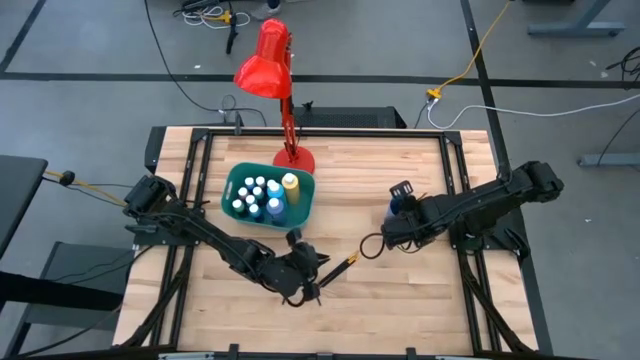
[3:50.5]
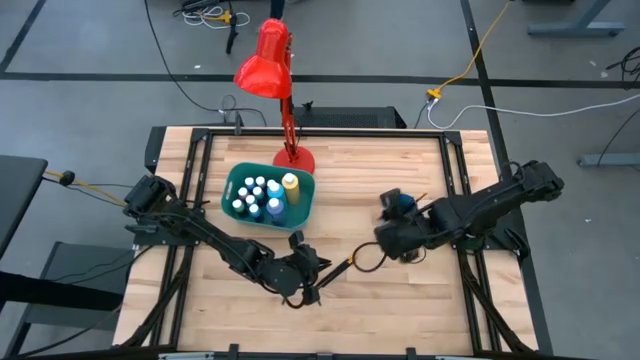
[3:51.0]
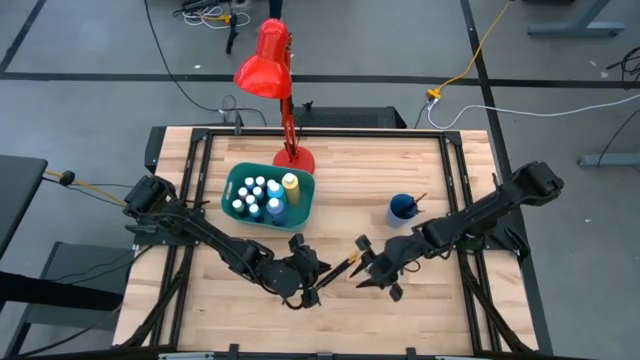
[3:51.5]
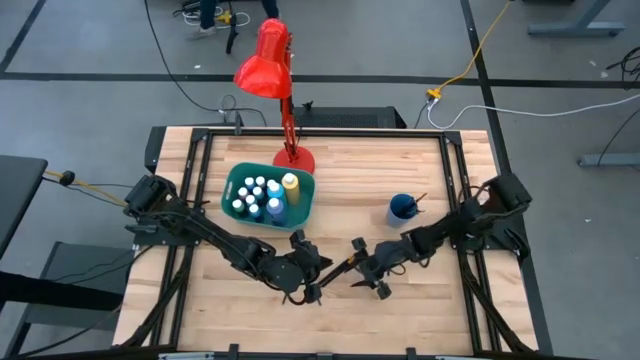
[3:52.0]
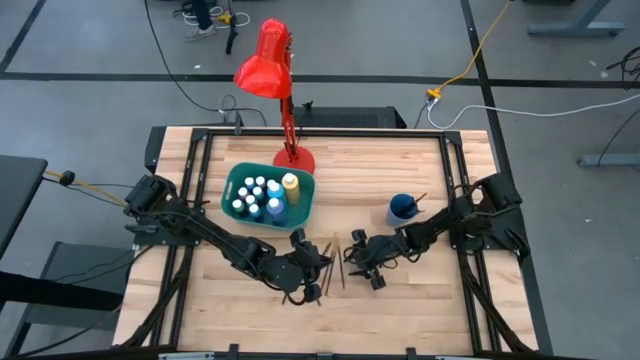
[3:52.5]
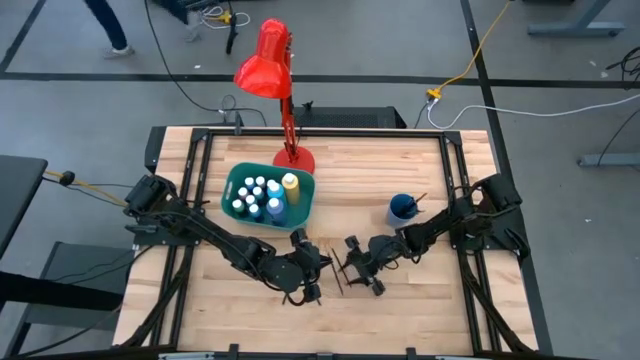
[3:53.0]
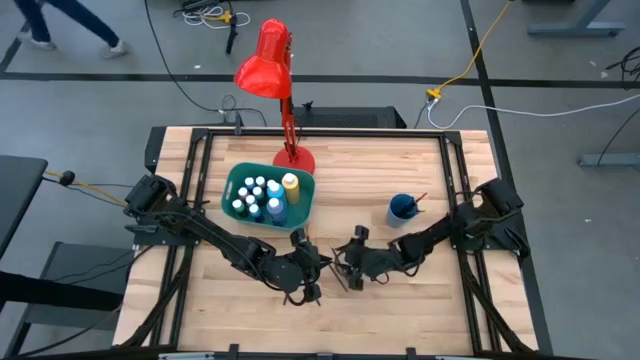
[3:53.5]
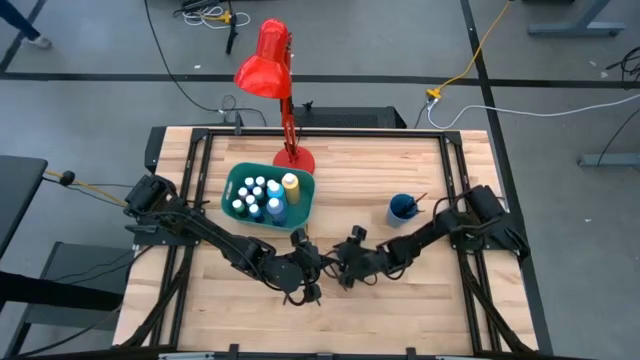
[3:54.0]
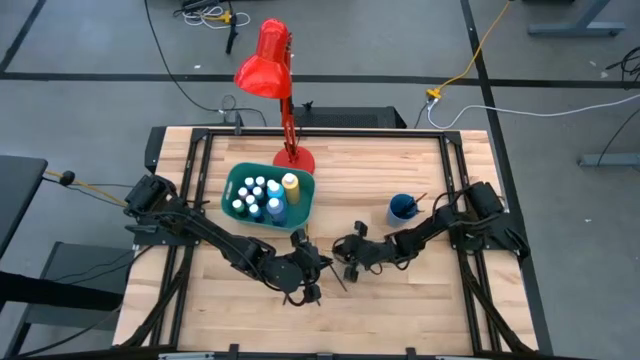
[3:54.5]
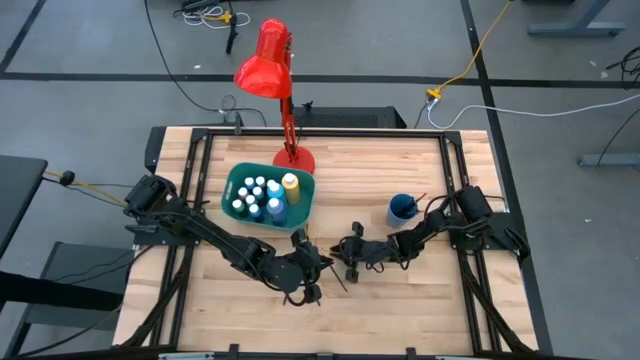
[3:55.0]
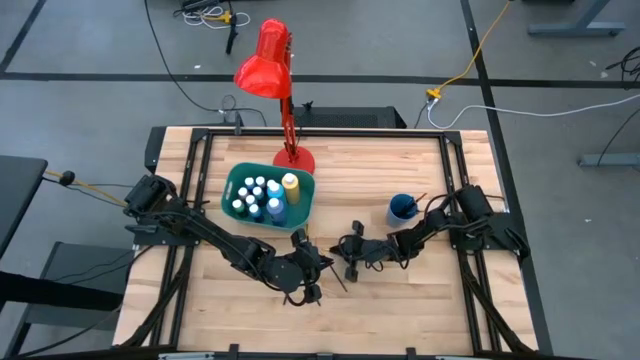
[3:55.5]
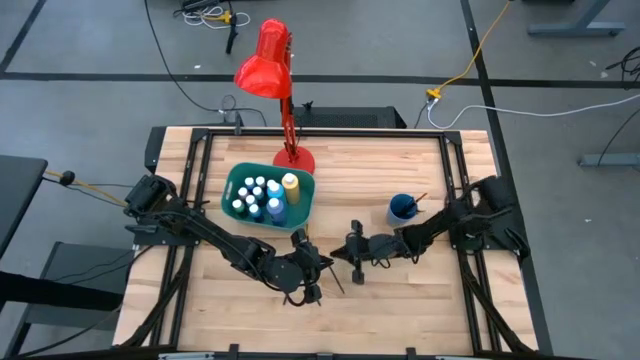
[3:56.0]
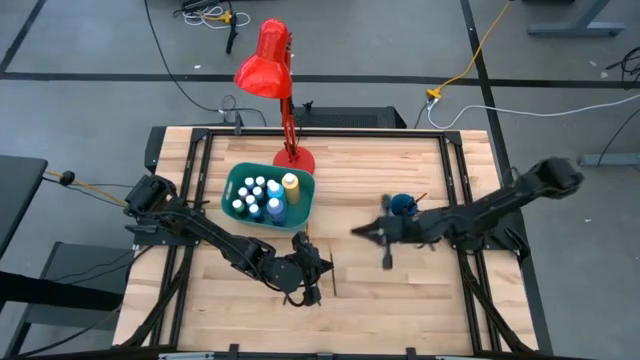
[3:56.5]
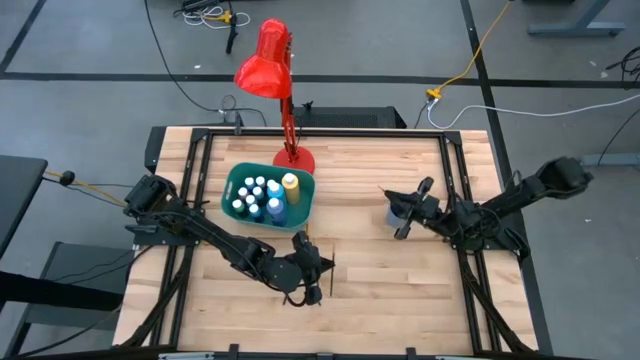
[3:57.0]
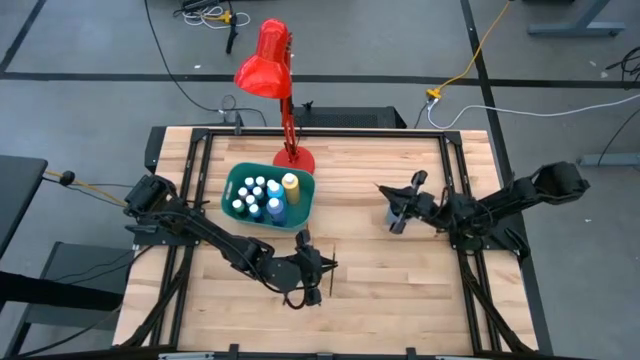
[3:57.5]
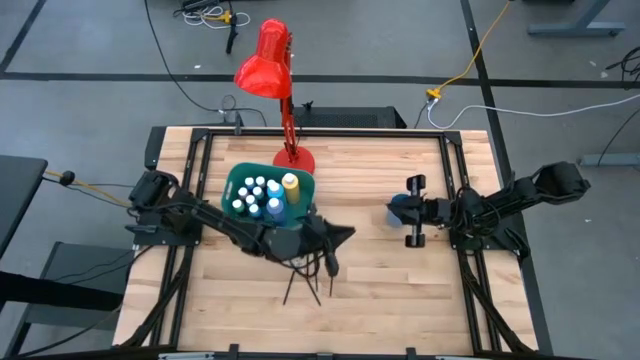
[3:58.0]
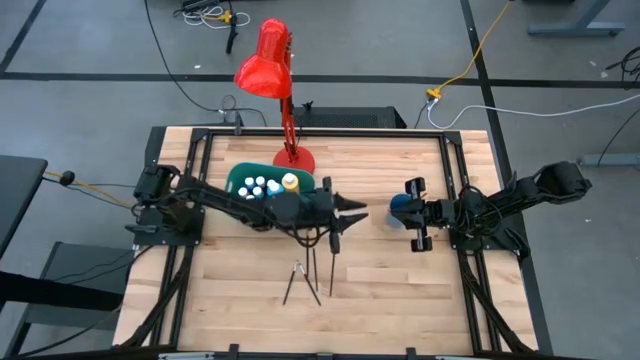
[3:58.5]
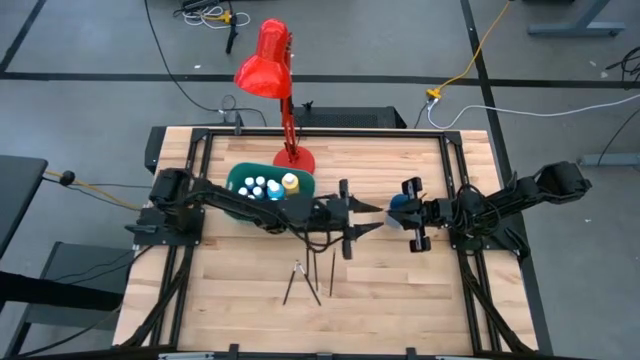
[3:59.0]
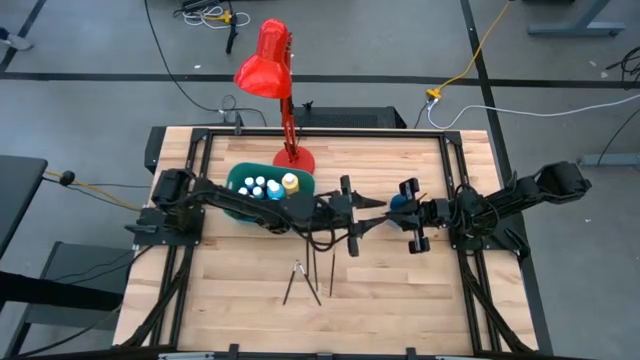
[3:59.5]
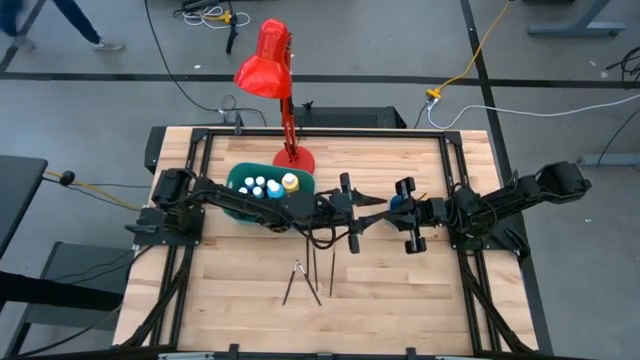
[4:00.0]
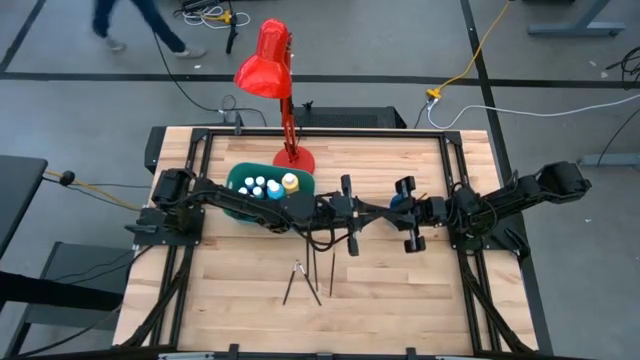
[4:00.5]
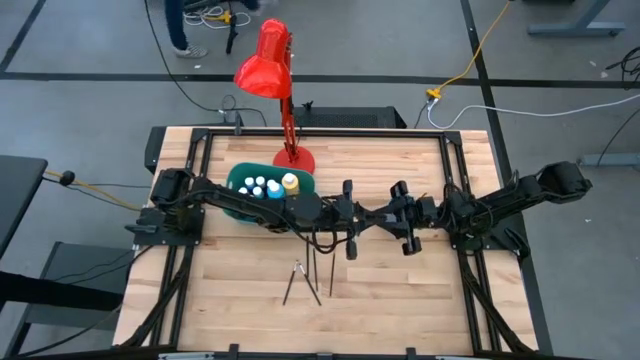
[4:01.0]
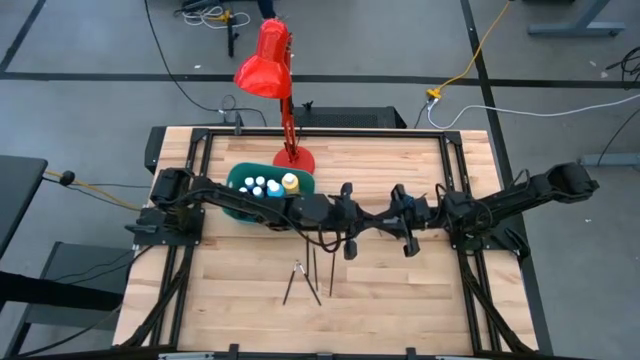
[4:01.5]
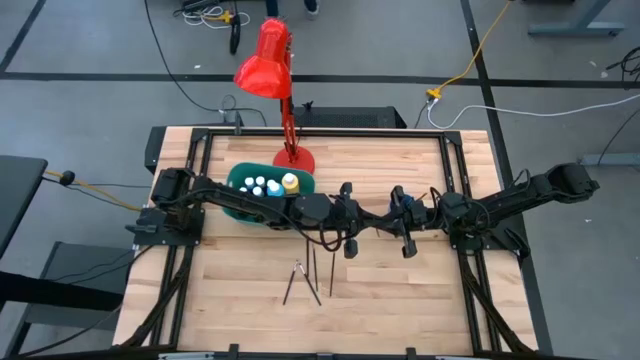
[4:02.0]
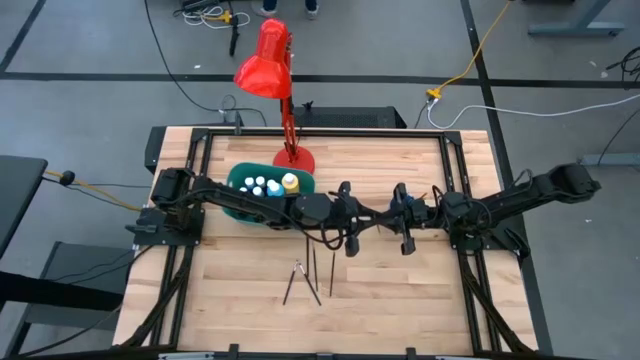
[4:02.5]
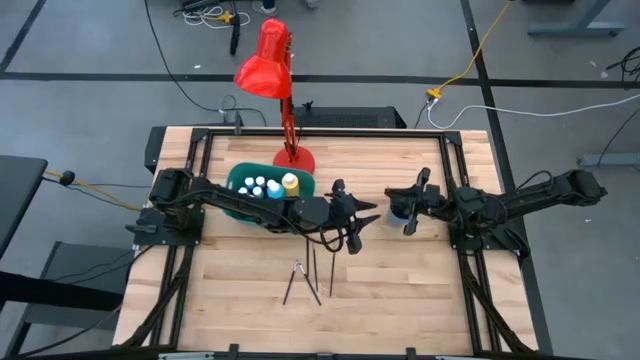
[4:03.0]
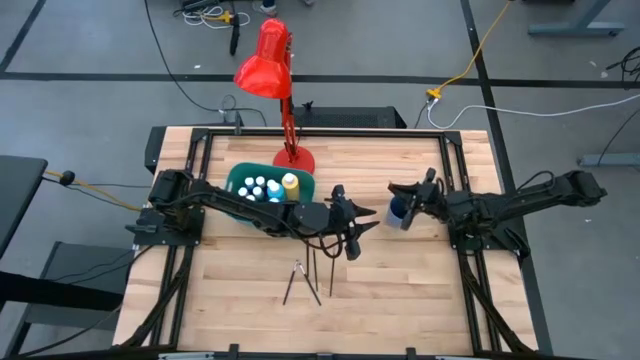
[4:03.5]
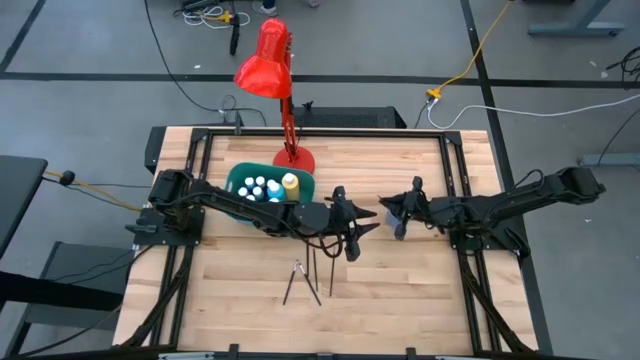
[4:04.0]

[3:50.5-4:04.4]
Task: Pick & Place Paint Supplies
Put the black gold paint brush into the blue cup

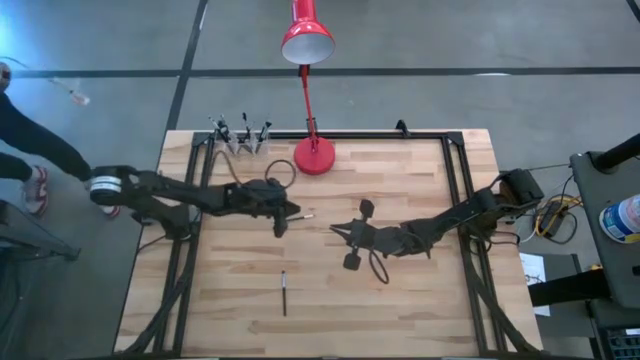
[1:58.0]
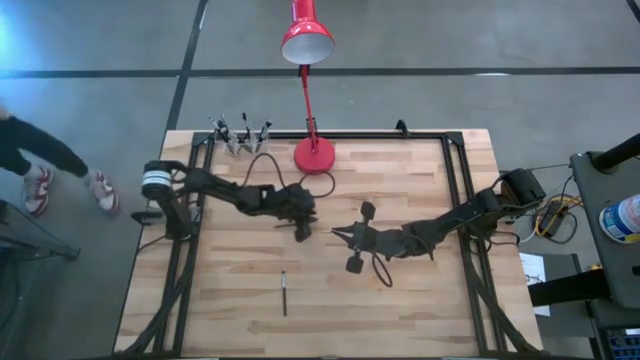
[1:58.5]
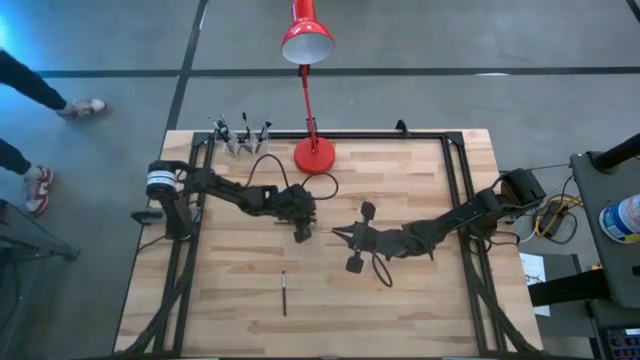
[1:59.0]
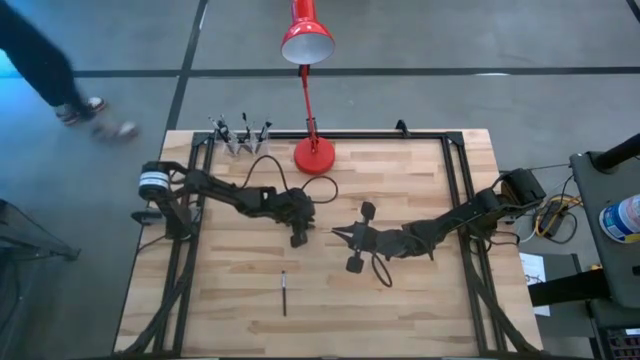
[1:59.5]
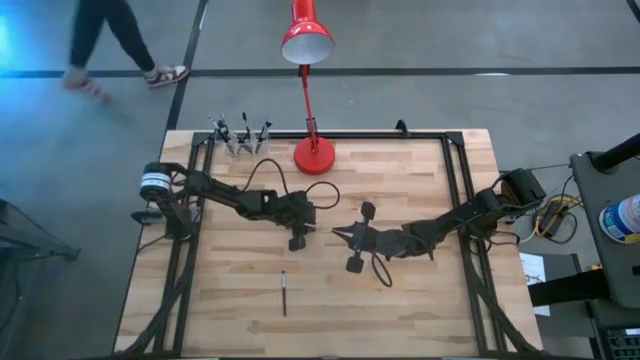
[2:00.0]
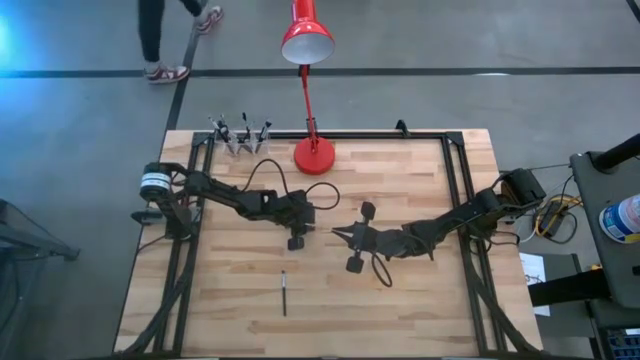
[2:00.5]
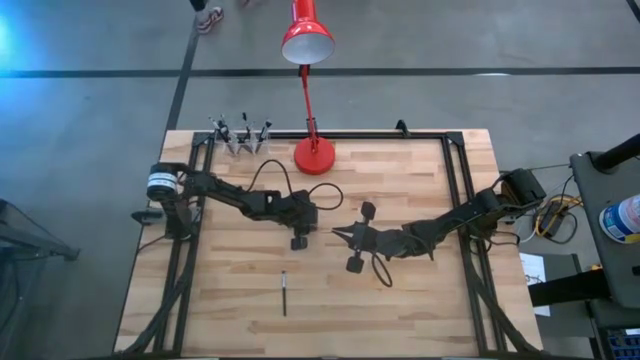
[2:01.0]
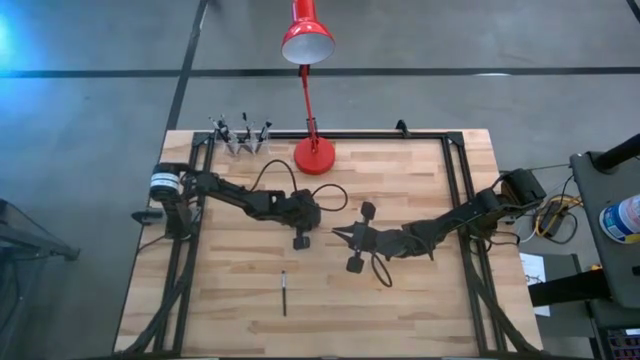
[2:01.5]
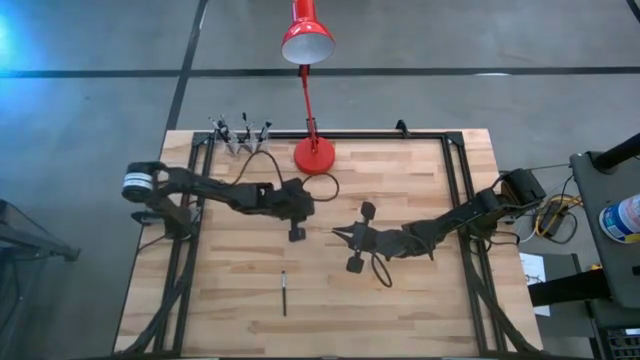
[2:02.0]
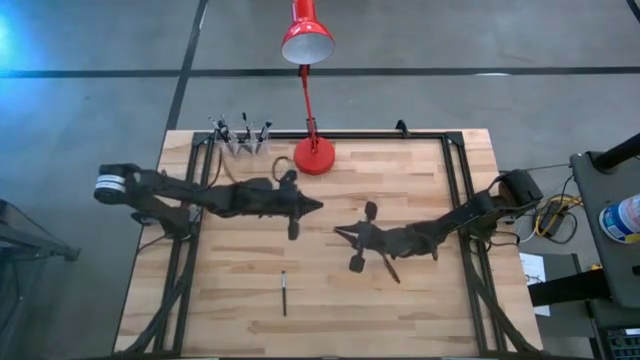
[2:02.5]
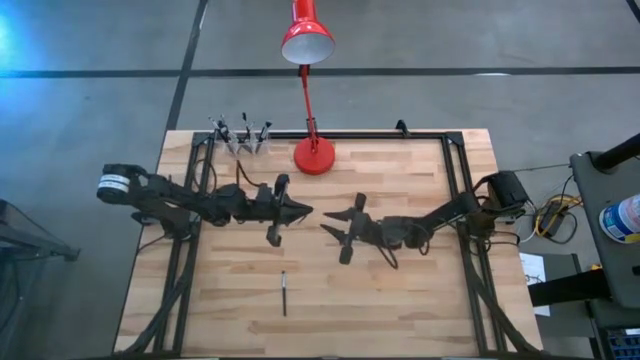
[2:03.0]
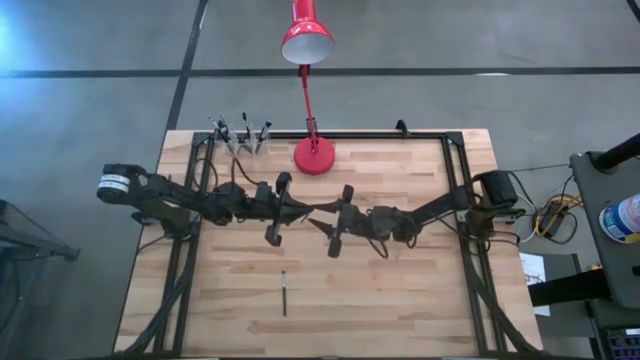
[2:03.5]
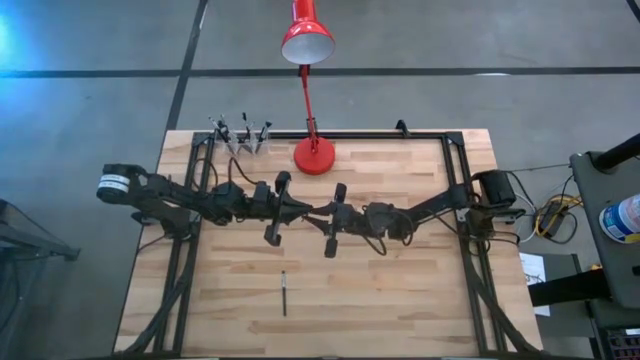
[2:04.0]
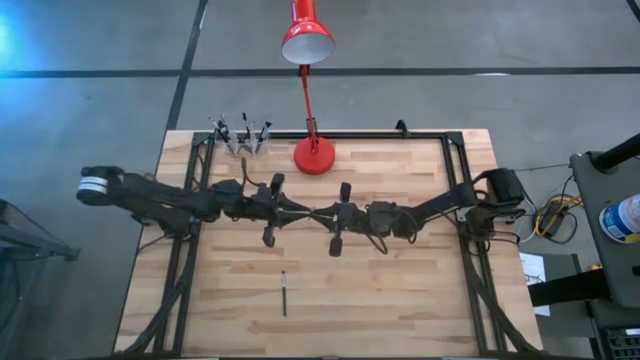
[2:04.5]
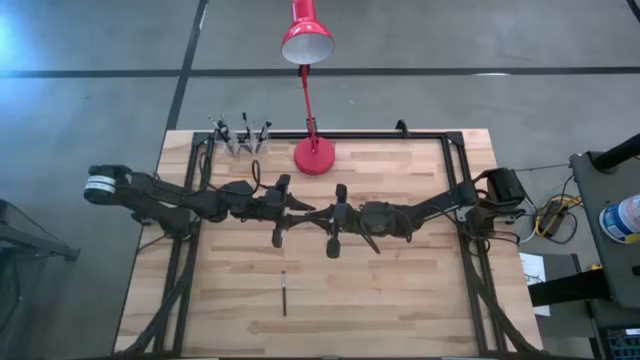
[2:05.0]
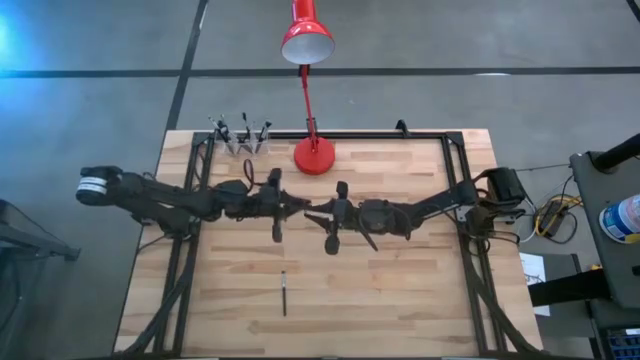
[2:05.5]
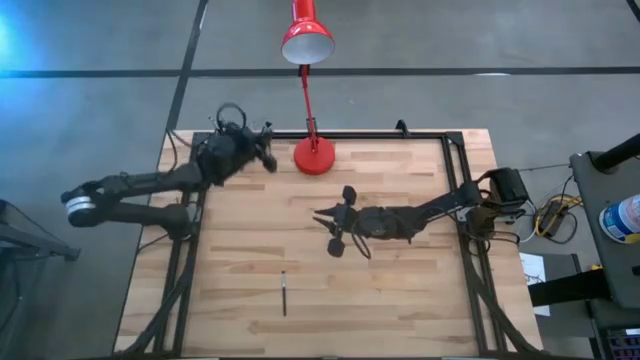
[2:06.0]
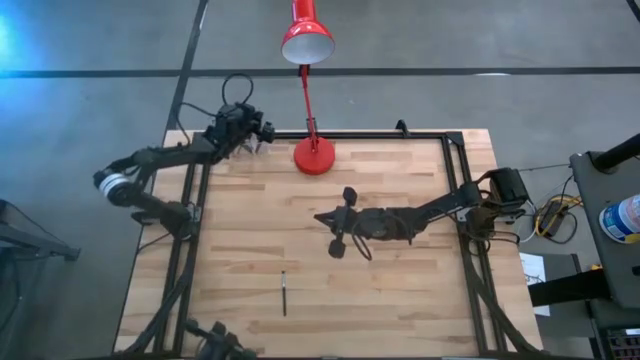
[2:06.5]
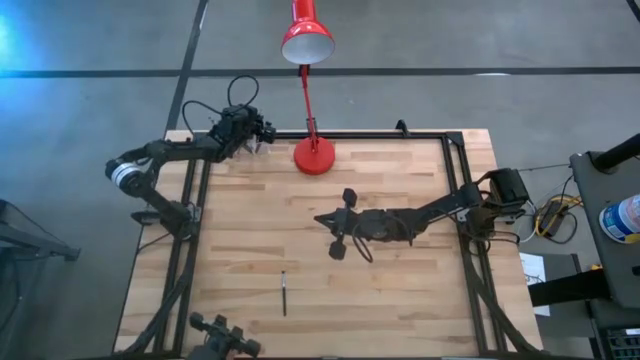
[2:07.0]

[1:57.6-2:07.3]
Task: Pick & Place Makeup Supplies
Put the makeup brush into the transparent organizer
